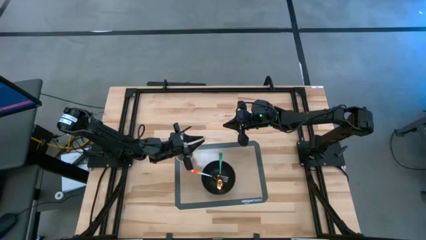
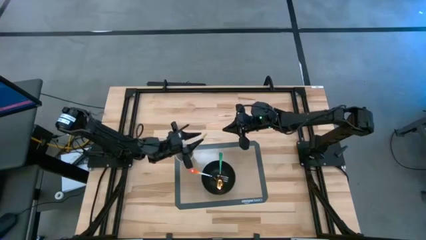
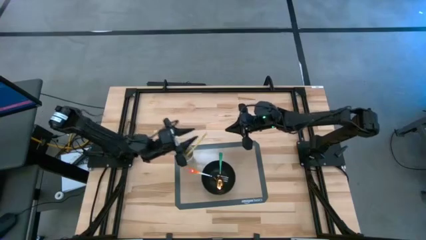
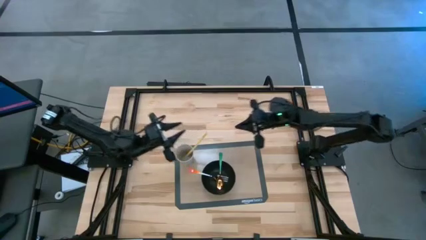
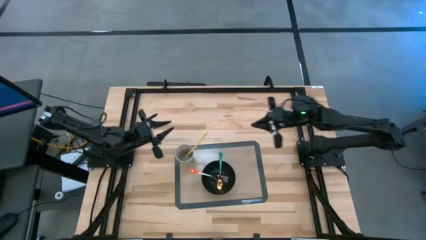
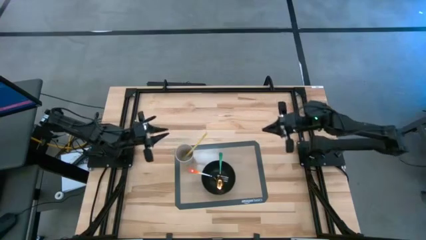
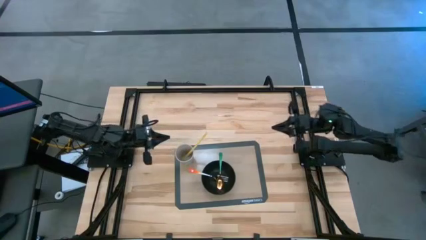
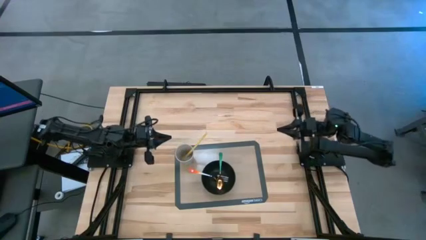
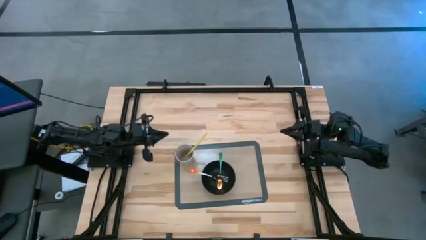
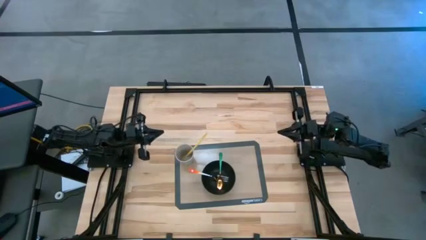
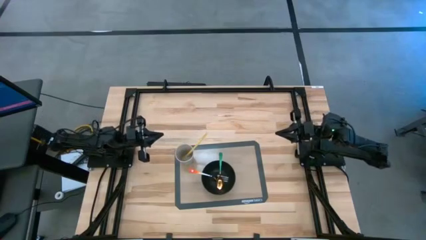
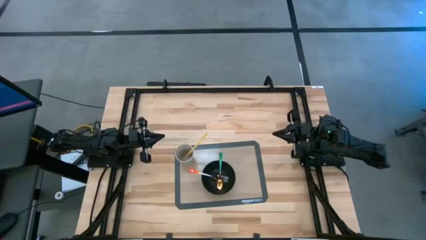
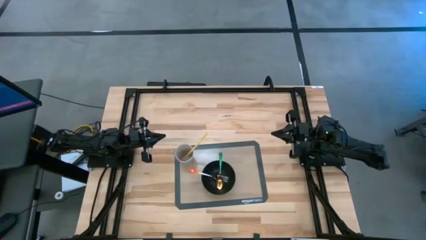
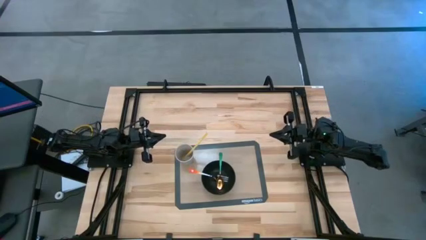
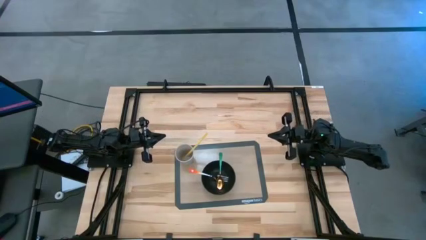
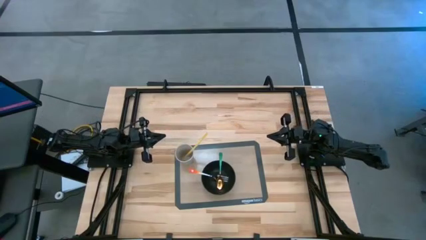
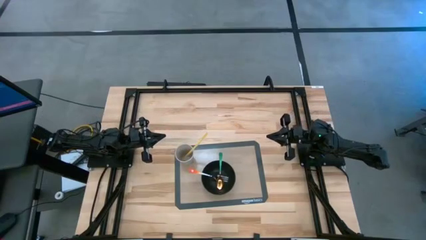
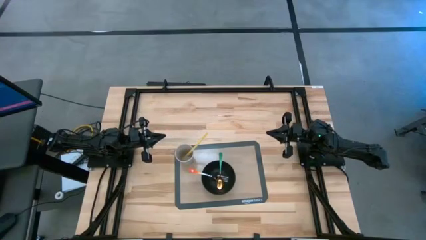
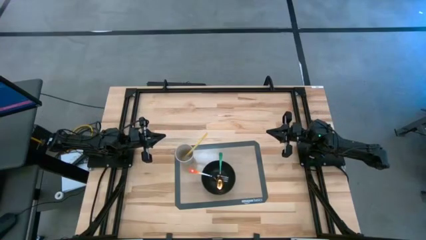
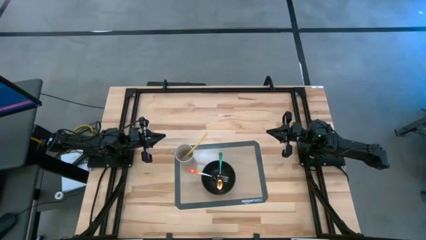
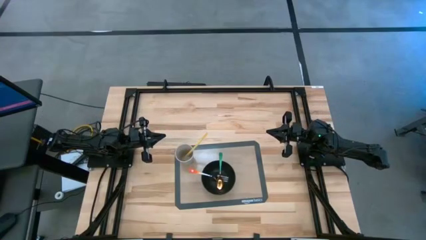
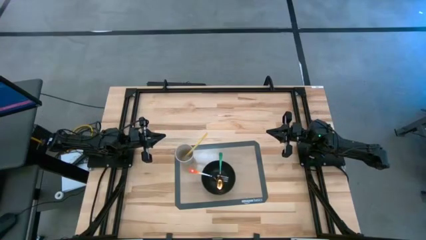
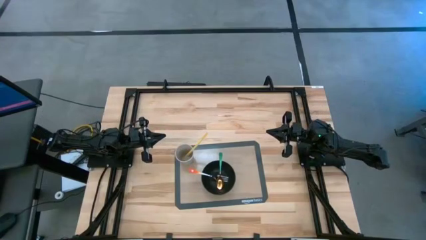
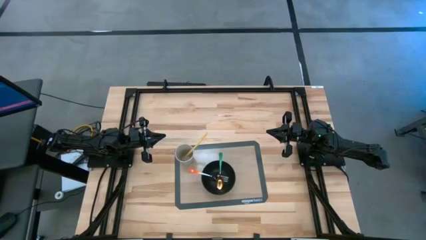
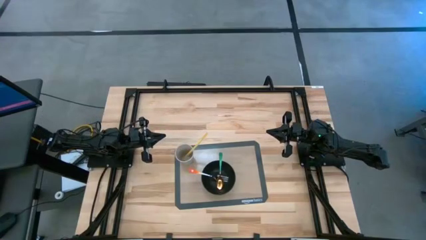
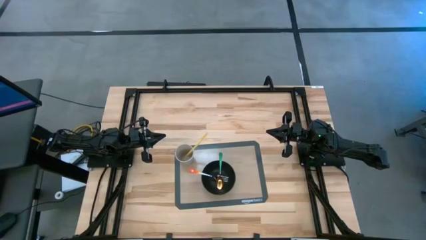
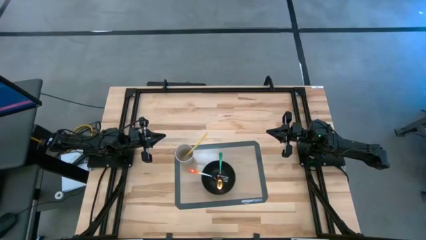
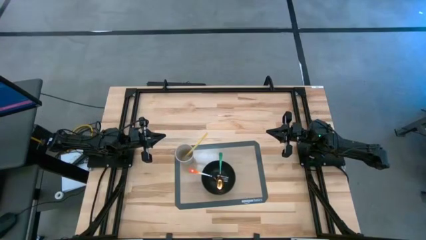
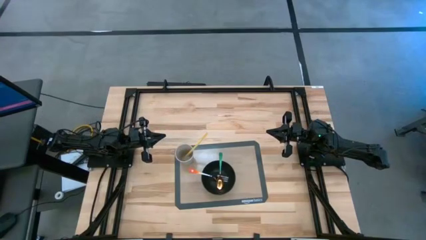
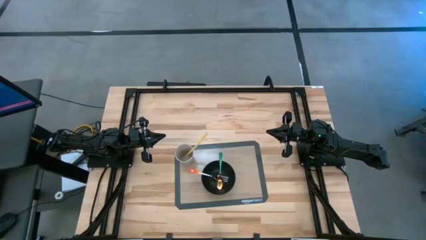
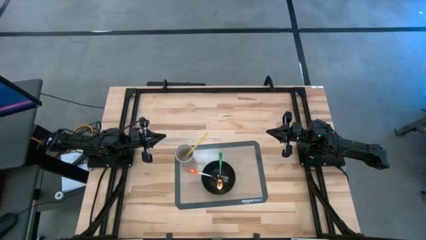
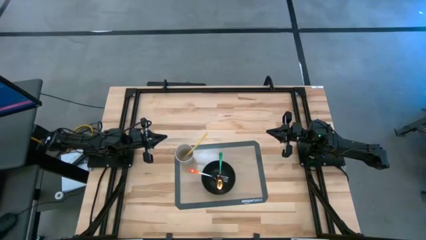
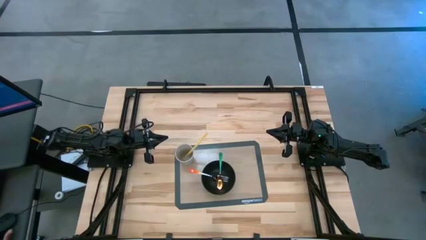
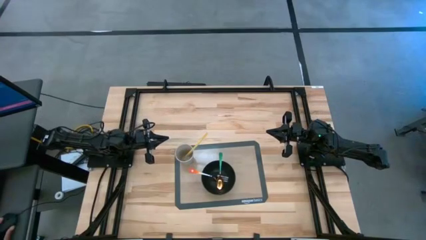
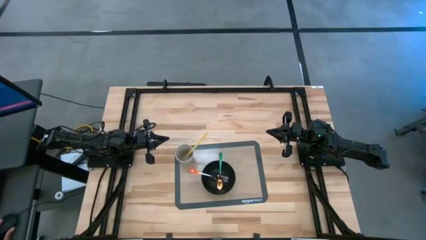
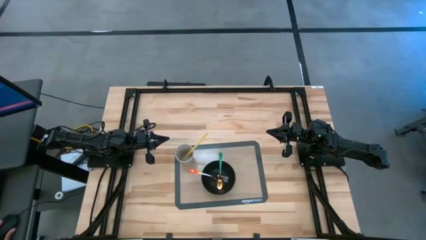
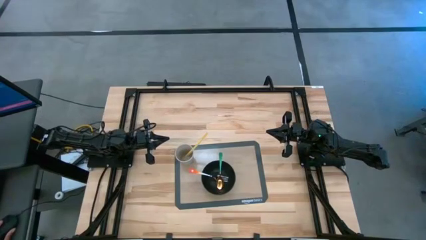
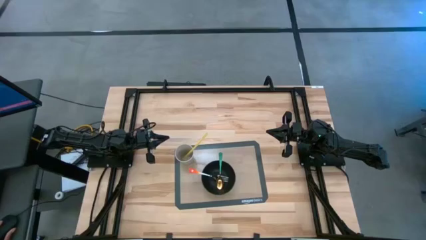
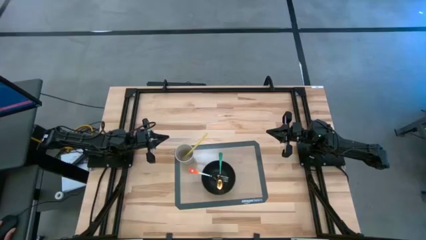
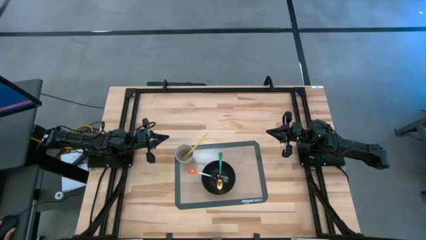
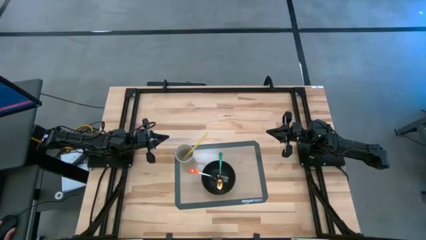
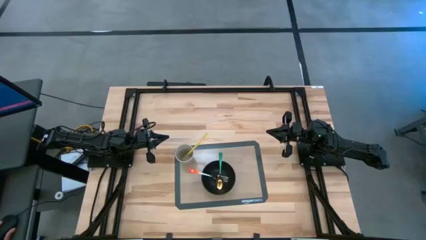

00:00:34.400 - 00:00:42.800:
Task: Pick & Place Utensil
Return to Home Position

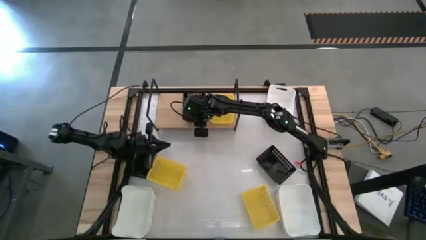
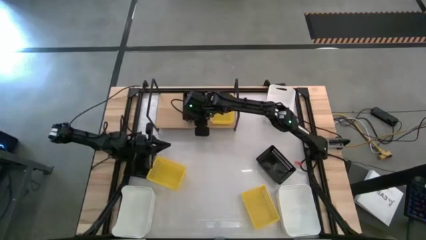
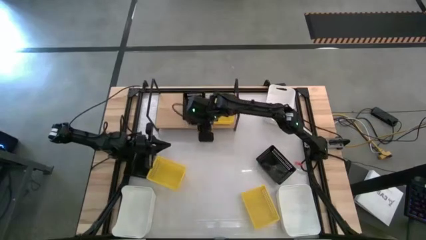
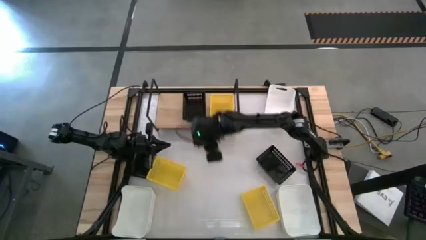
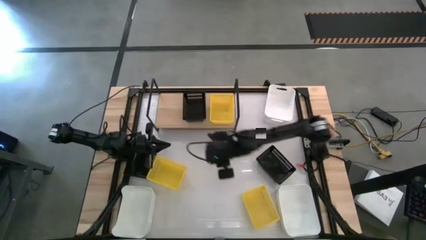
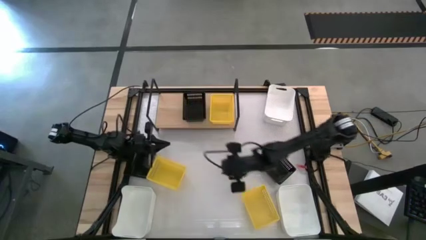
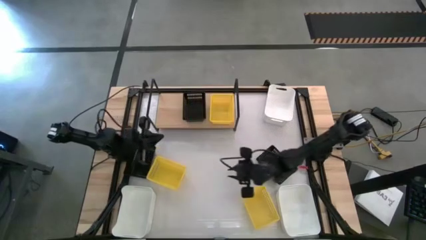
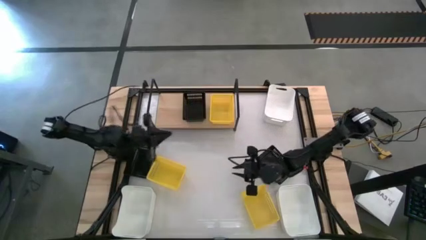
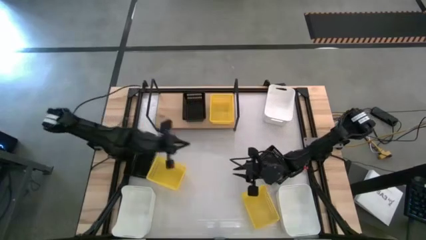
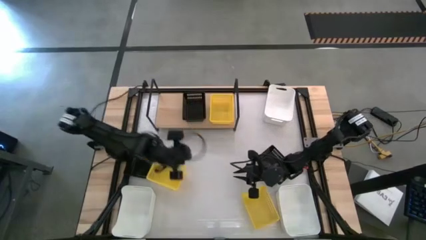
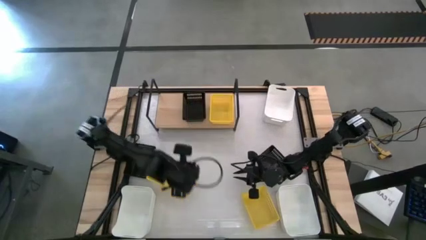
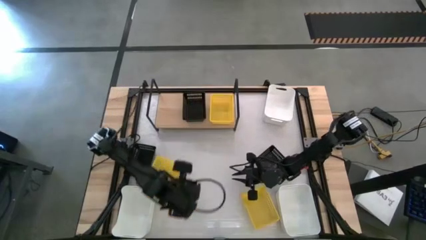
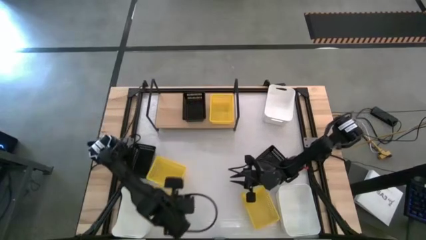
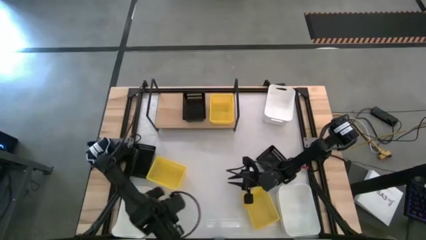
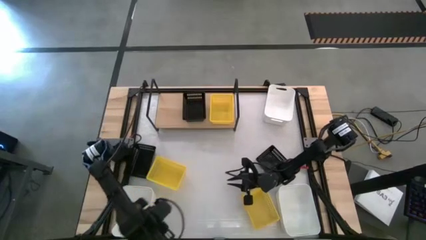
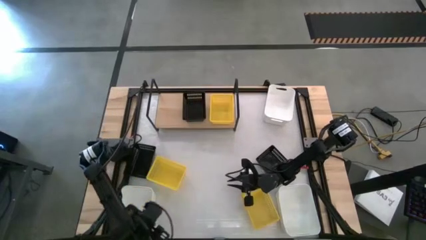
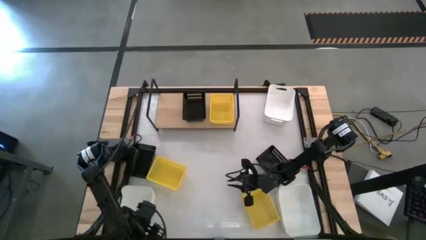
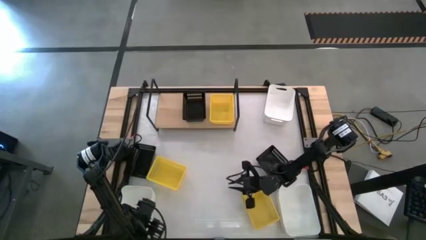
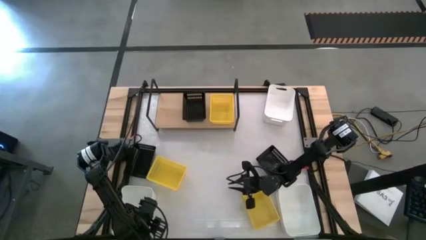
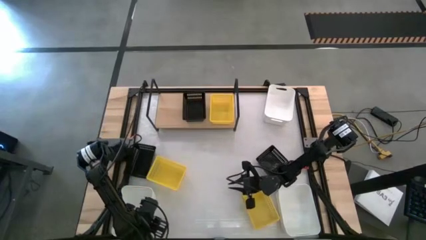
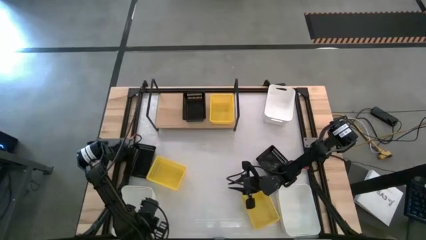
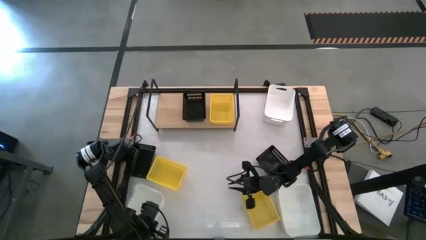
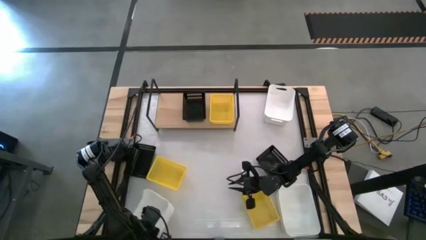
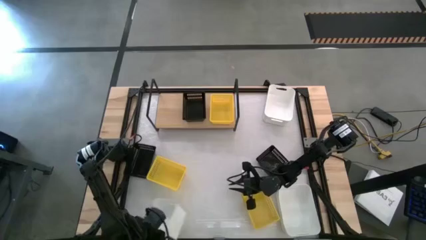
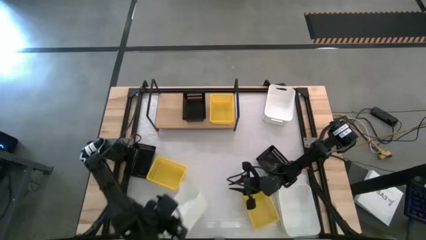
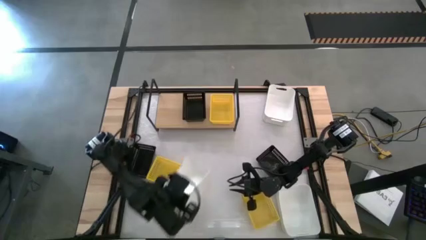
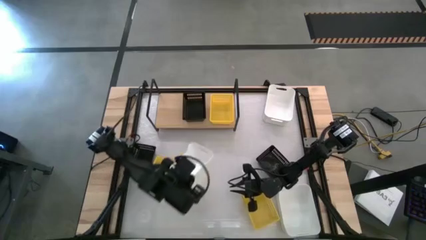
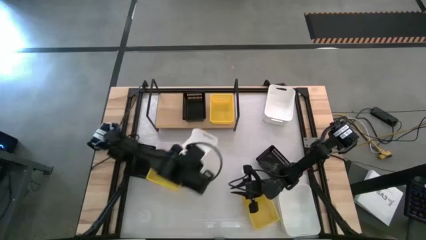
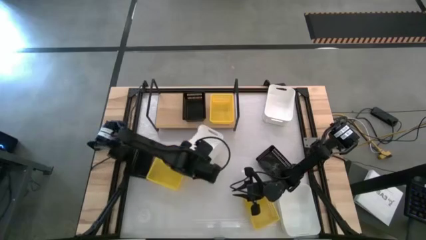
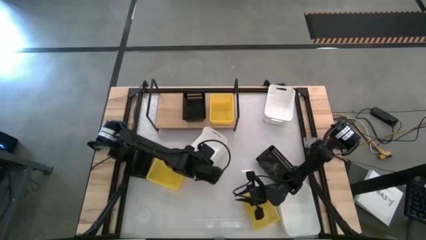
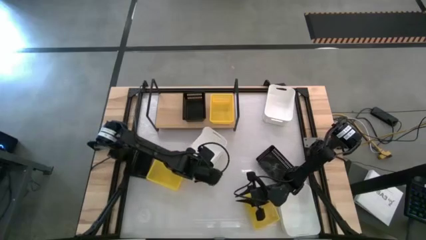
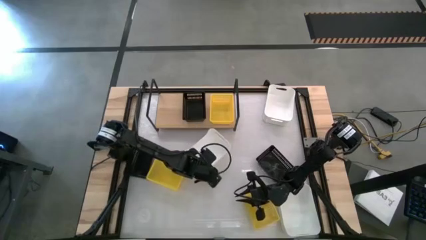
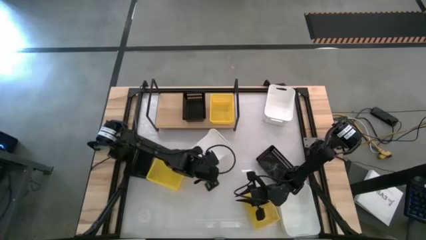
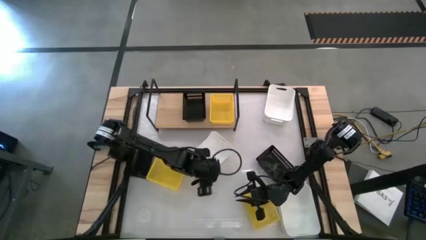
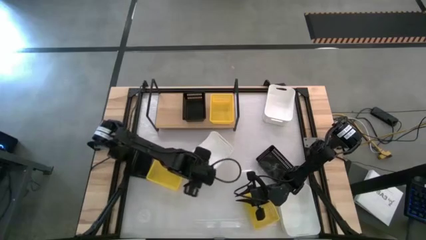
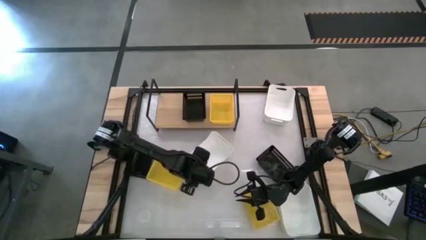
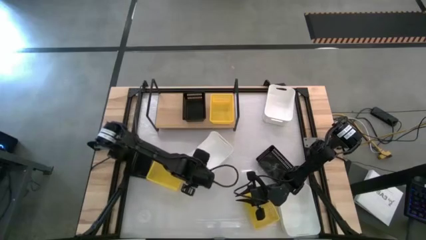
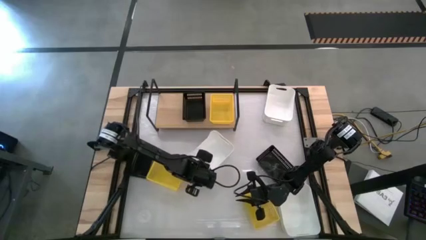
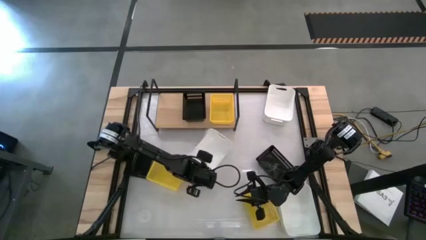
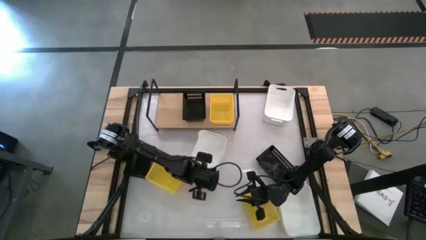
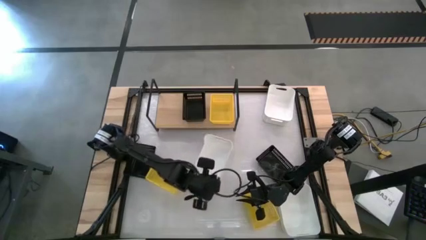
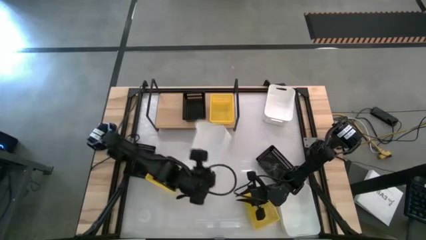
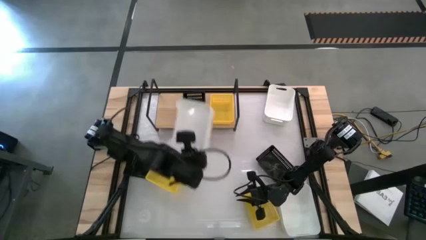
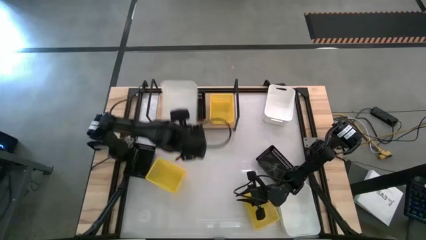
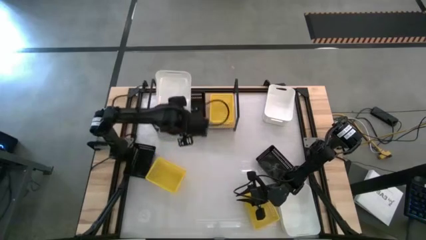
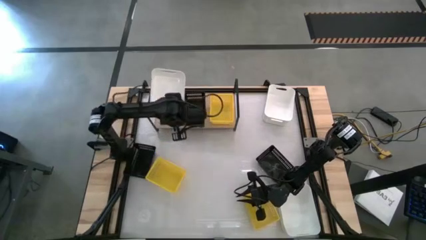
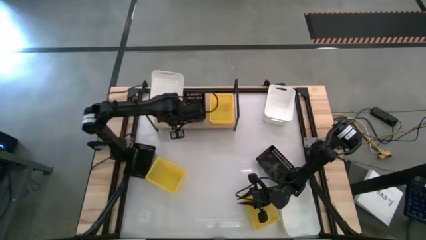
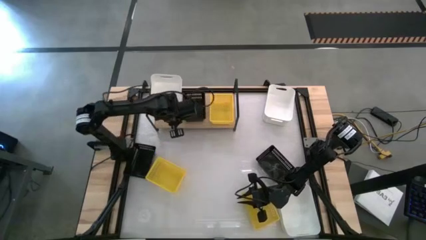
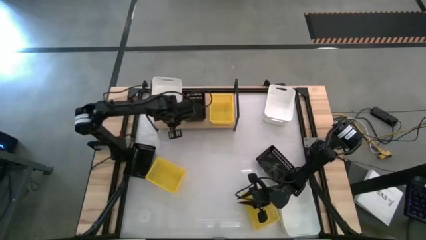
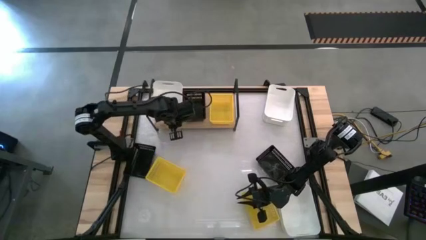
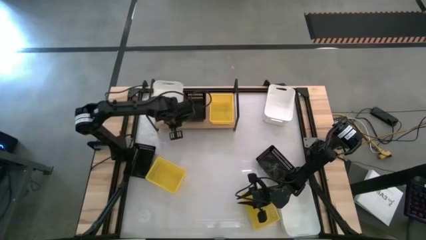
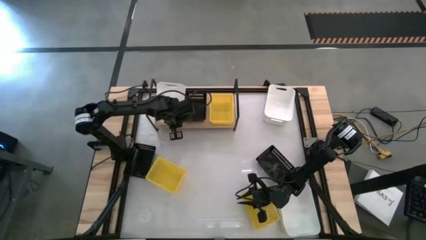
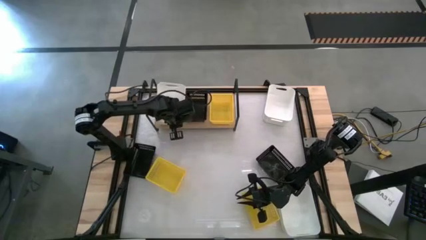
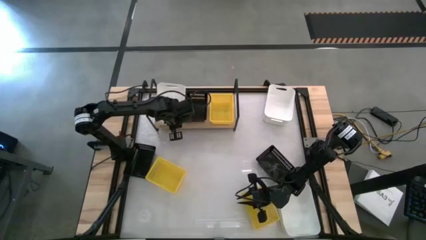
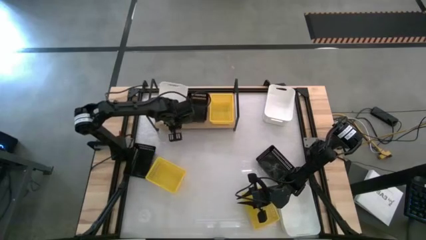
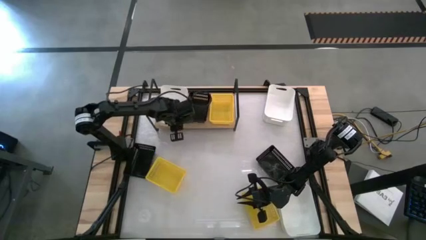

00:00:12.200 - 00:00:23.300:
Task: Stack baskets on shelf by color
Put the bottom left white bin on the shelf
